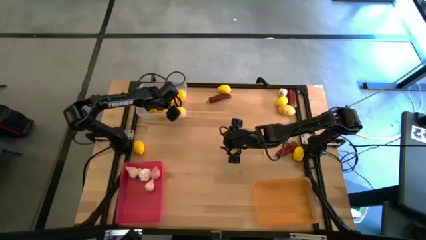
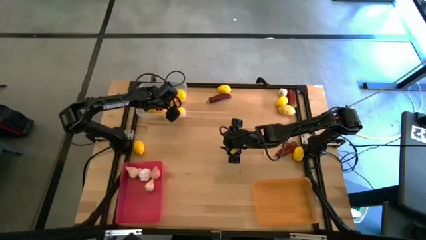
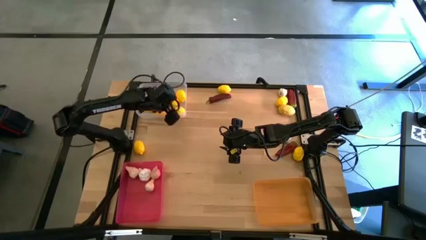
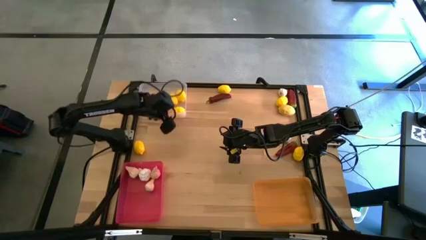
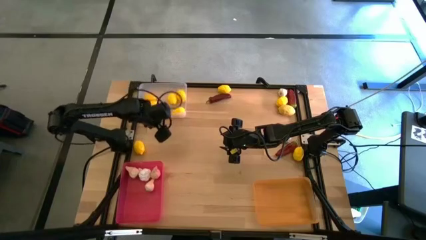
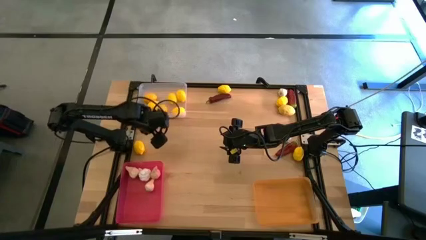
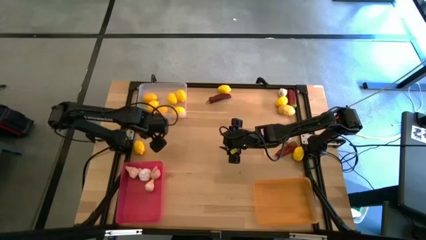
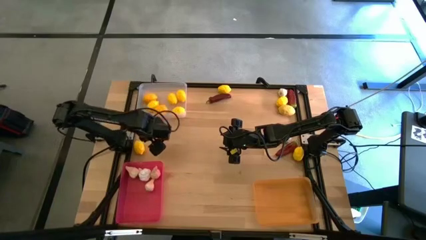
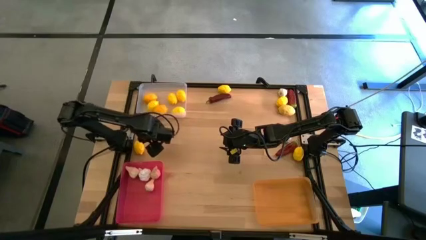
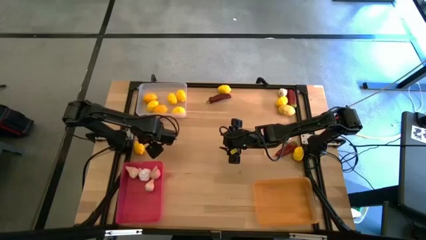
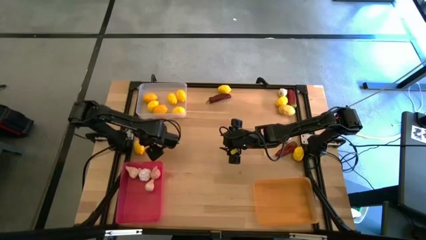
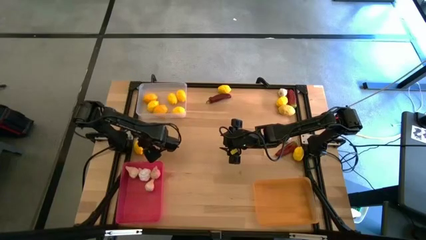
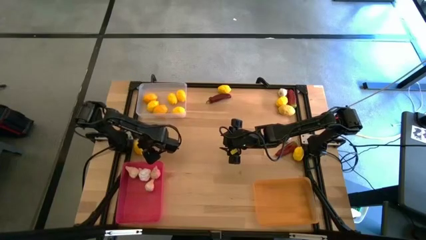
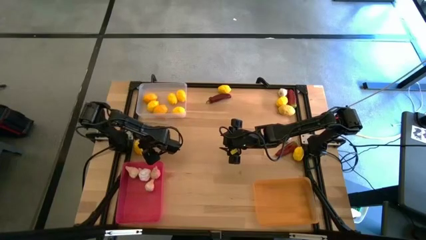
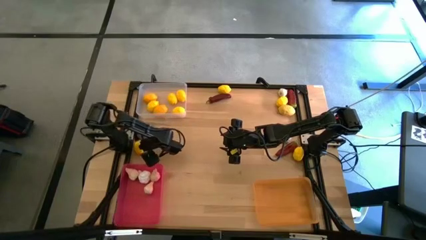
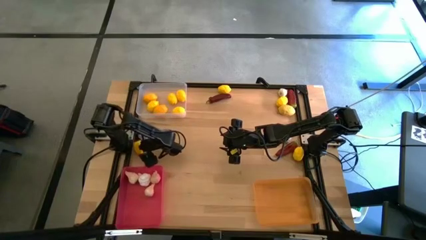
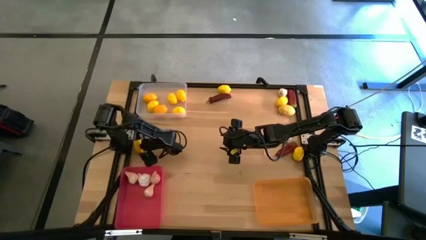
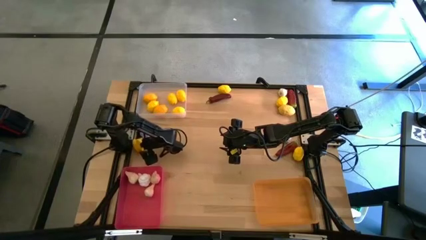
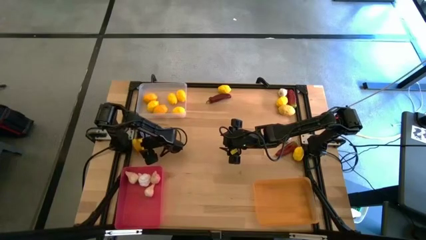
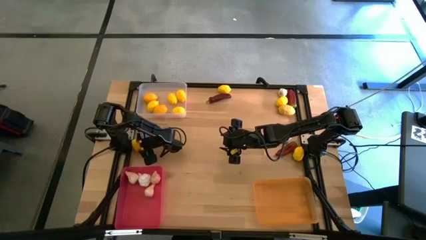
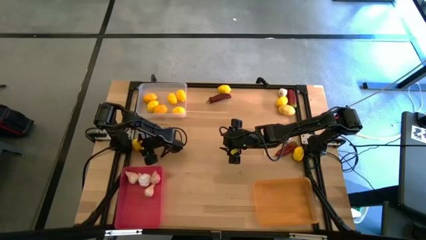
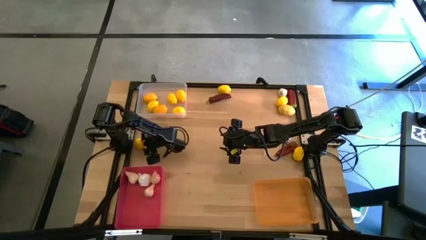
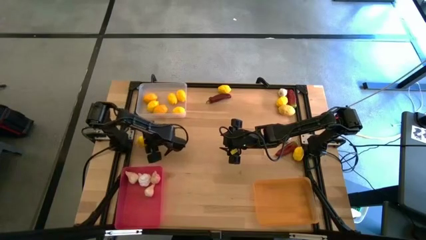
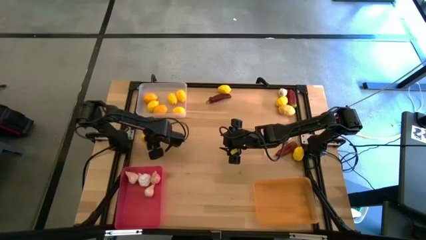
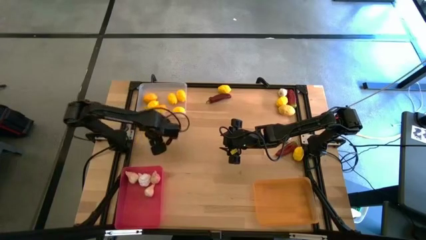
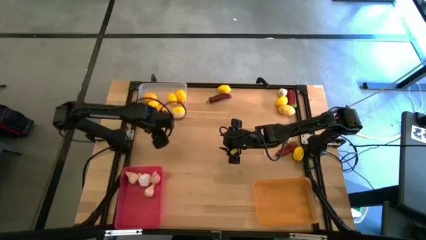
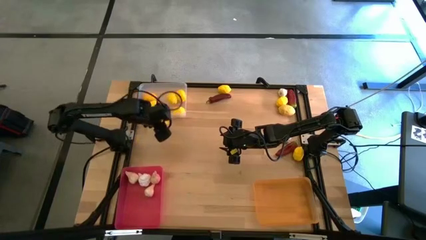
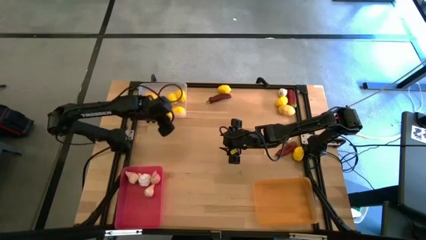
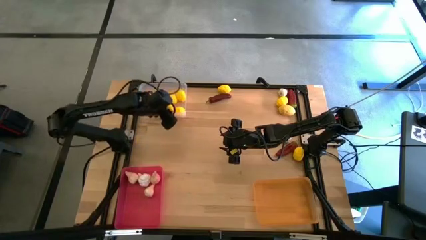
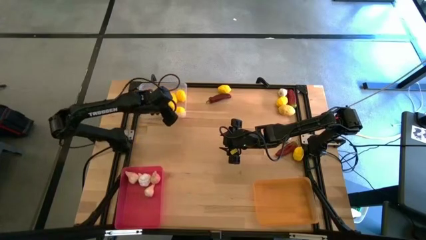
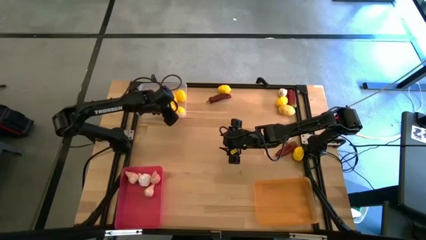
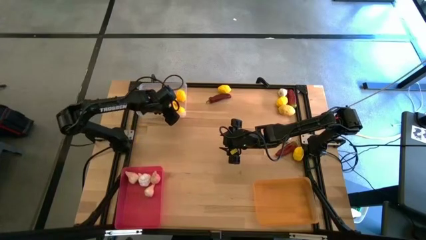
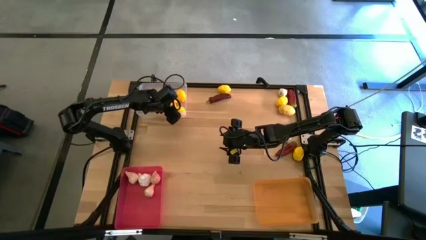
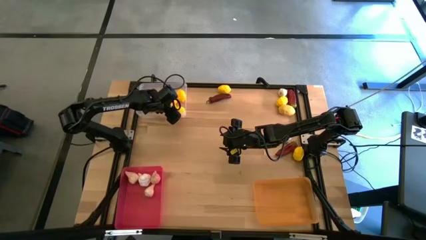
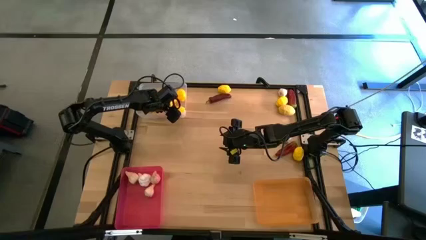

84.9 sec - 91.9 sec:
Task: Sort produce into baskets
Put the yellow lemon into the left white bin

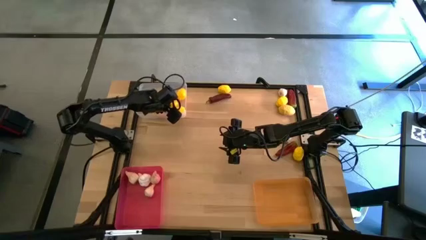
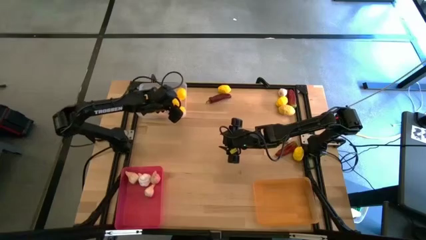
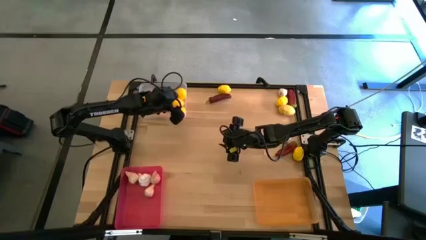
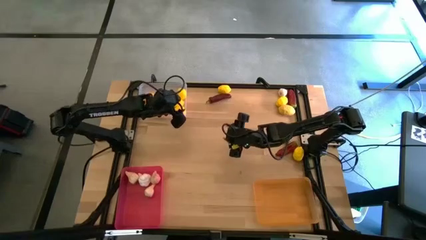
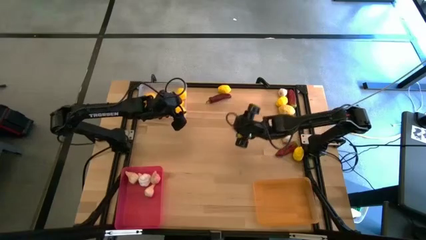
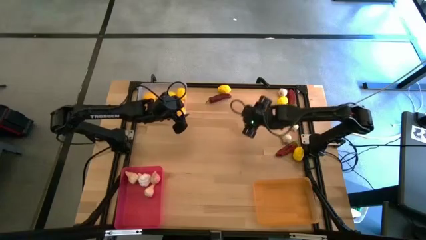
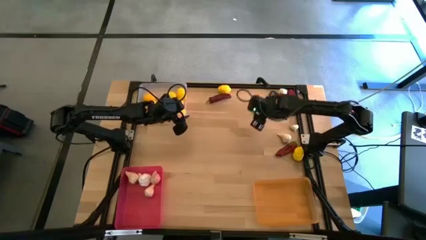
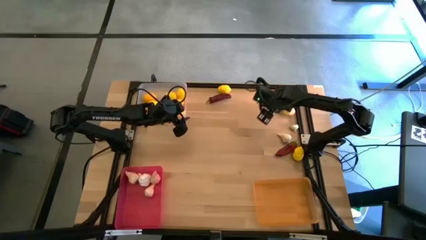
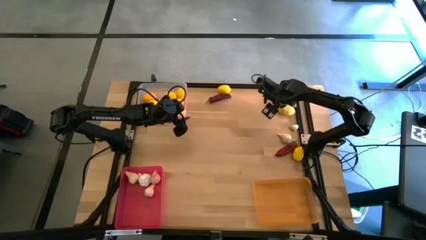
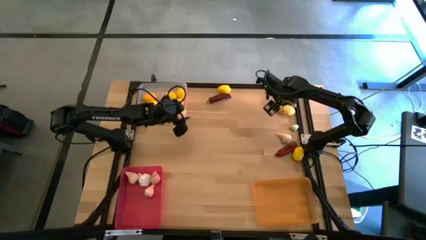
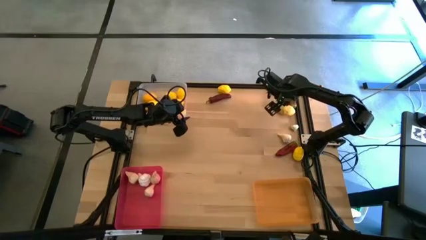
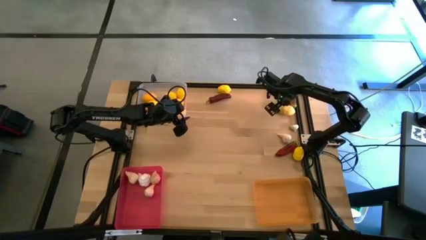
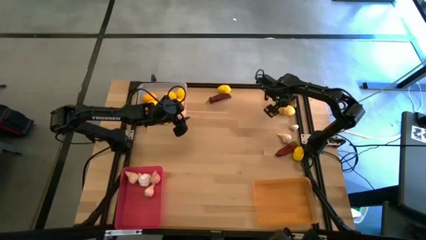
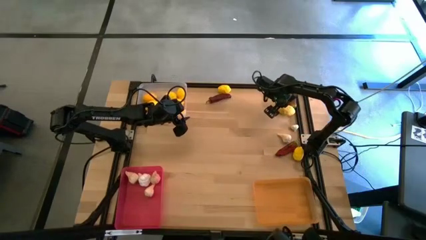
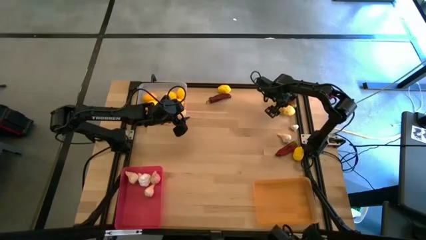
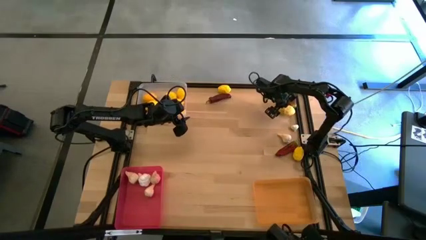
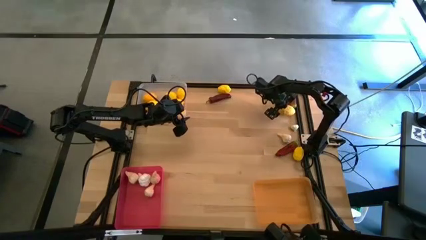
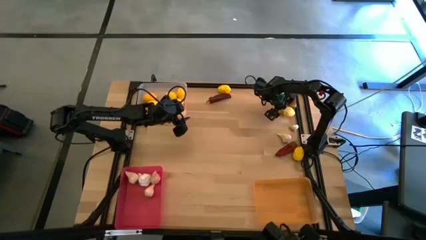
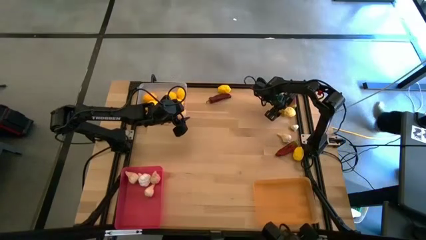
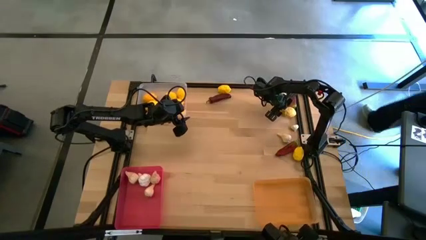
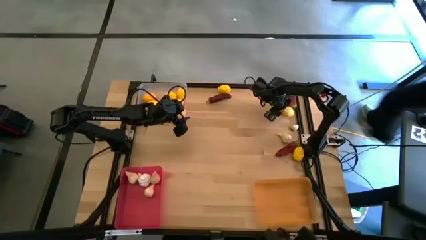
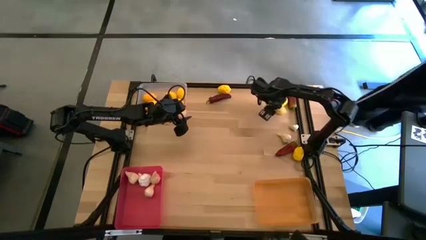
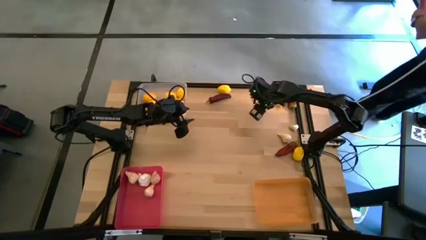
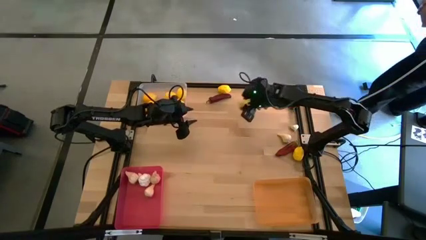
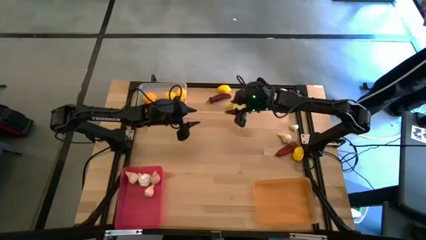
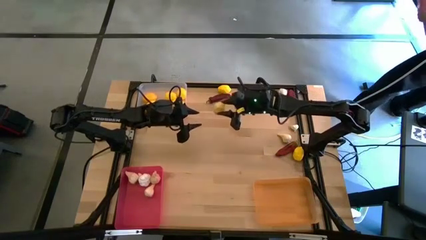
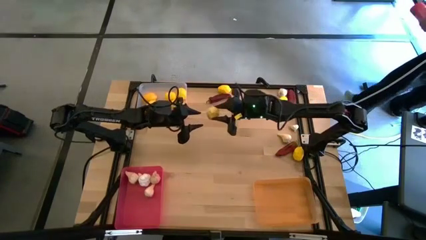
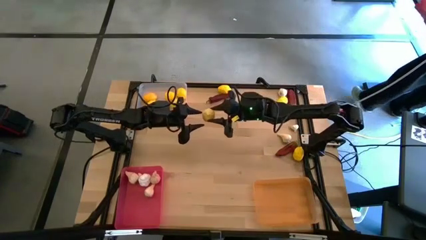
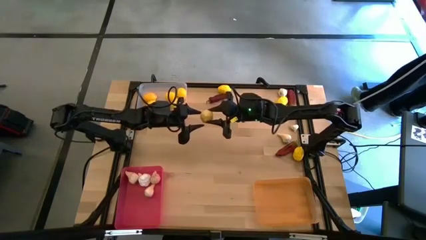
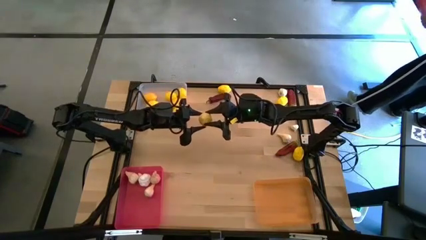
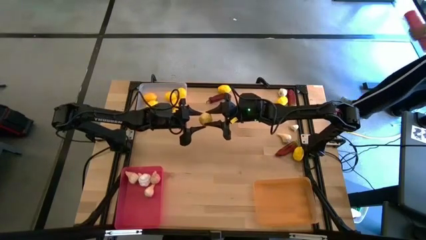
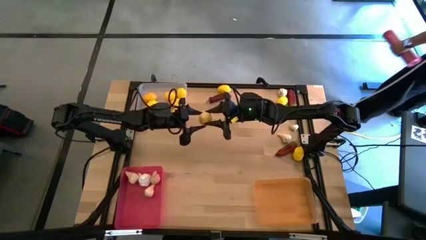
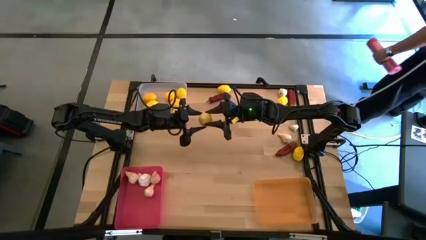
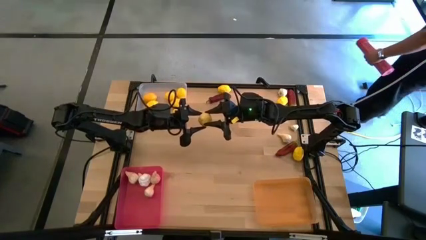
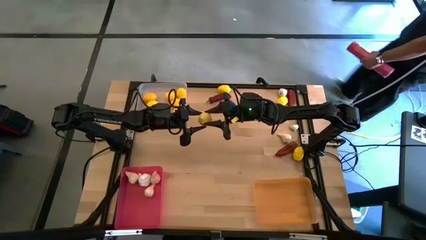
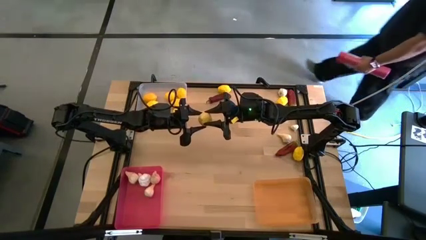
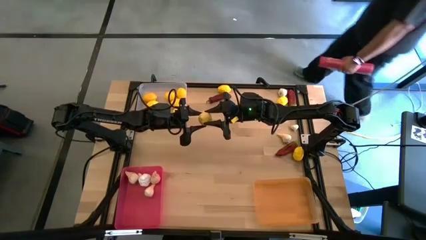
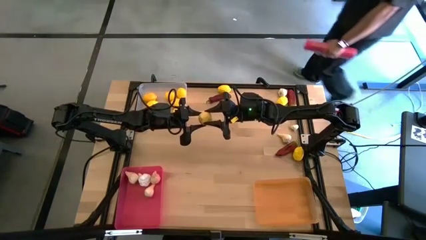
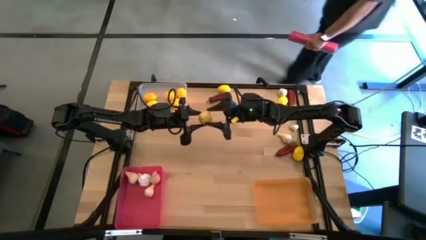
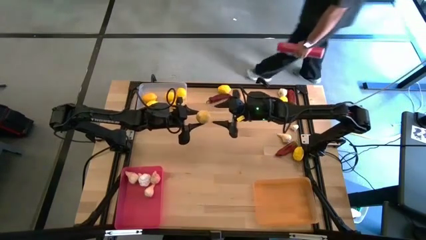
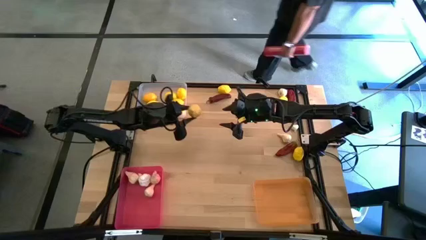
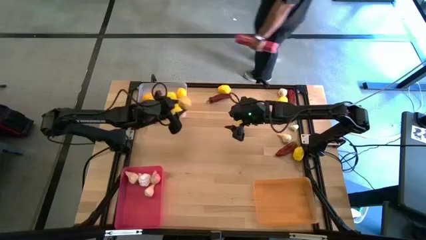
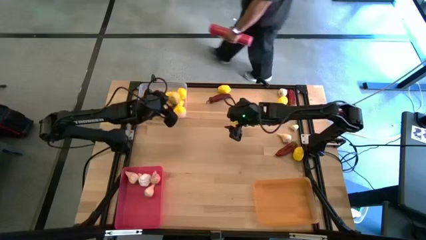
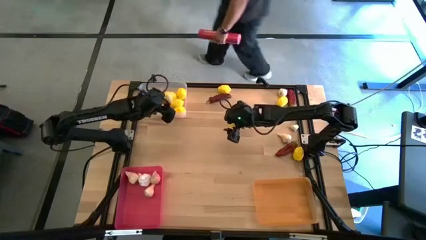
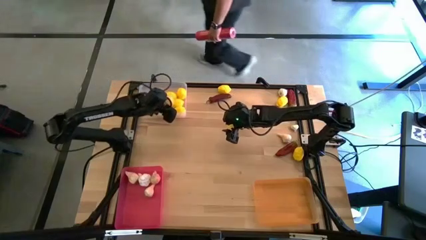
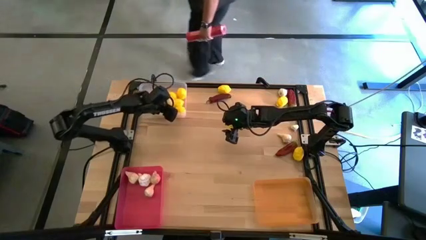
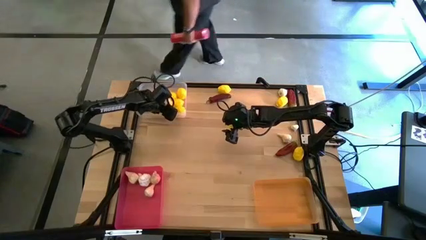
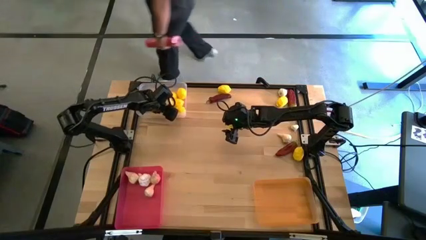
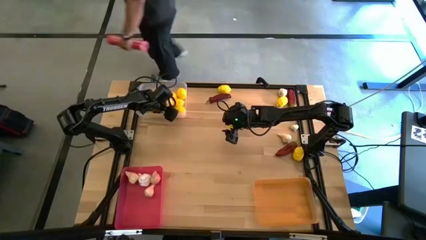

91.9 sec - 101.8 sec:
Put the yellow lemon into the left white bin
